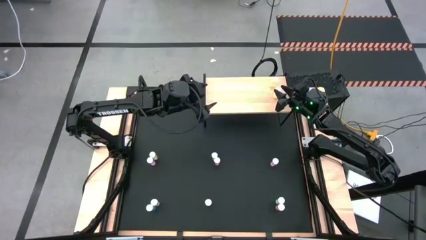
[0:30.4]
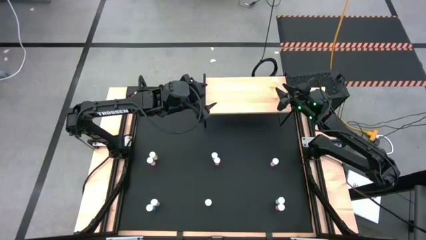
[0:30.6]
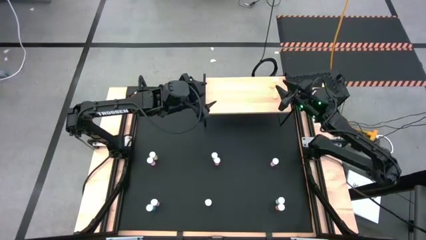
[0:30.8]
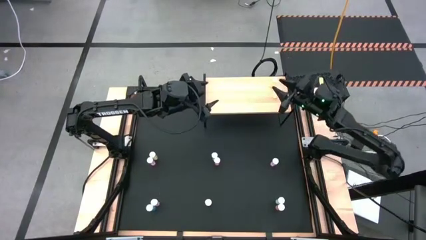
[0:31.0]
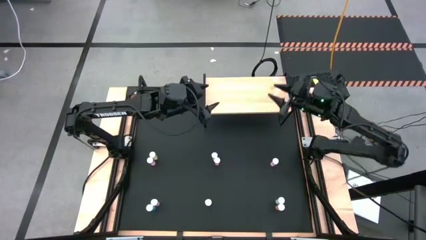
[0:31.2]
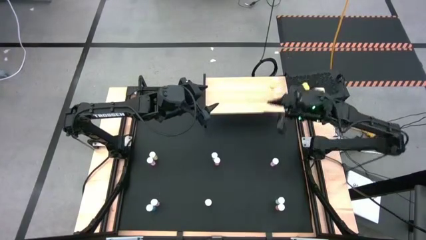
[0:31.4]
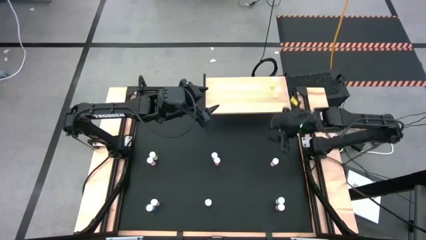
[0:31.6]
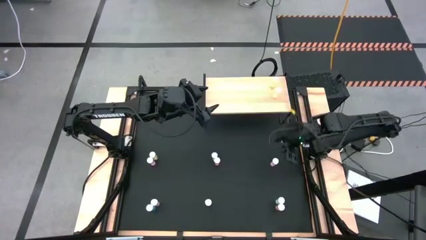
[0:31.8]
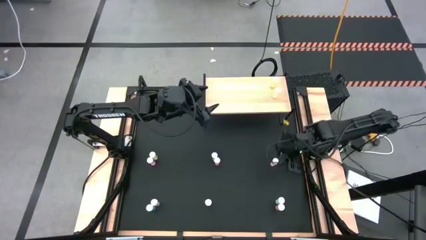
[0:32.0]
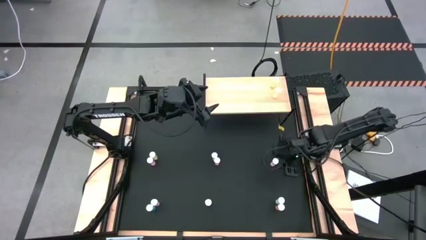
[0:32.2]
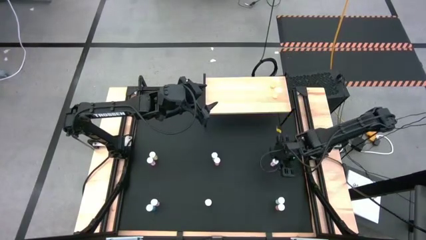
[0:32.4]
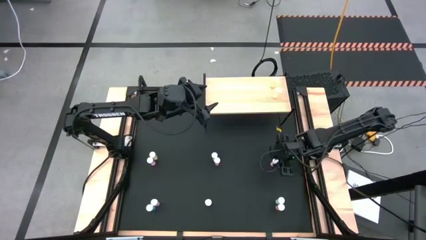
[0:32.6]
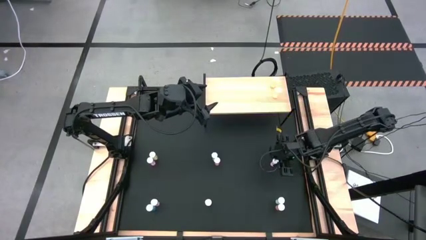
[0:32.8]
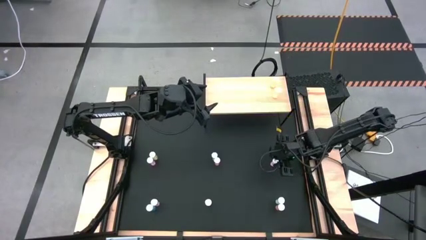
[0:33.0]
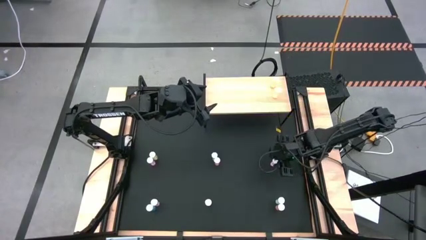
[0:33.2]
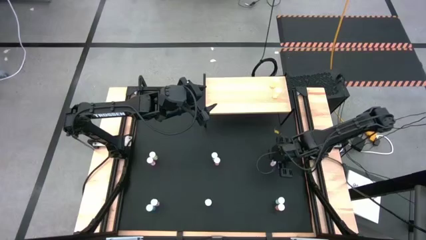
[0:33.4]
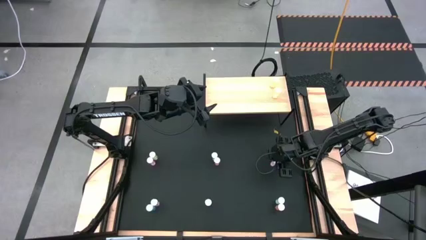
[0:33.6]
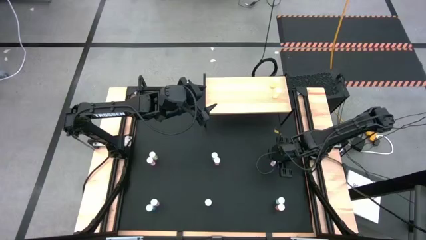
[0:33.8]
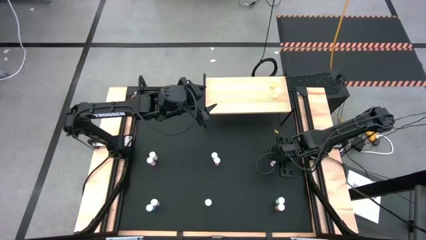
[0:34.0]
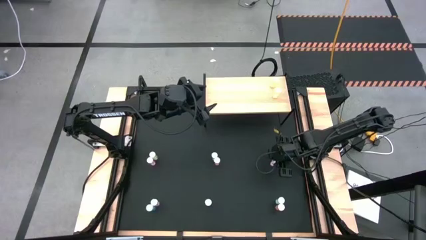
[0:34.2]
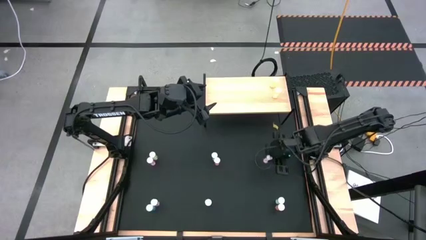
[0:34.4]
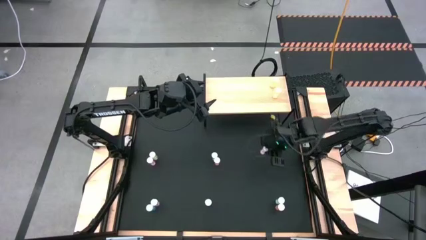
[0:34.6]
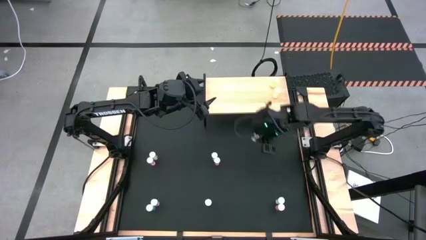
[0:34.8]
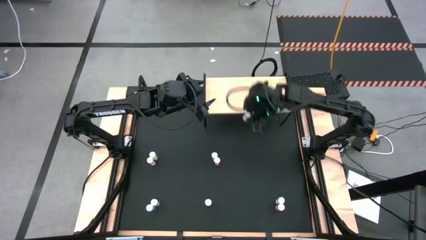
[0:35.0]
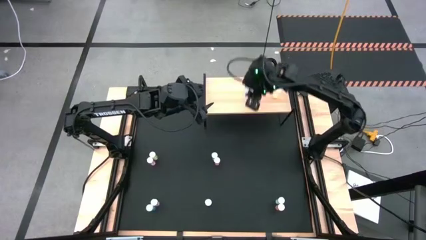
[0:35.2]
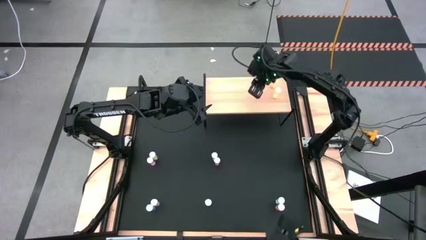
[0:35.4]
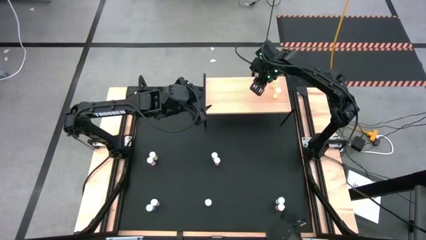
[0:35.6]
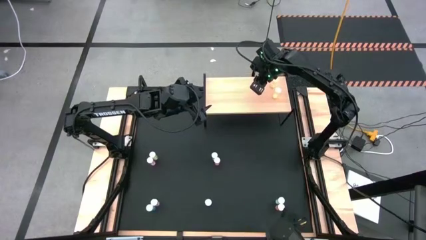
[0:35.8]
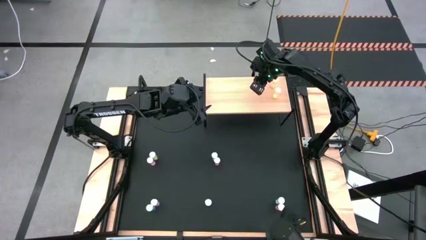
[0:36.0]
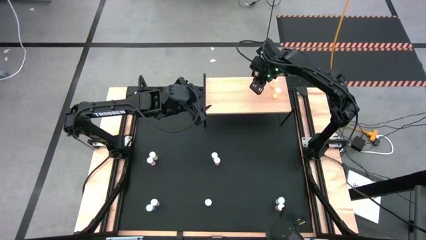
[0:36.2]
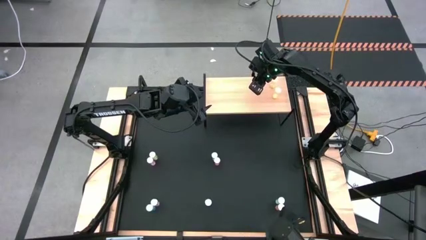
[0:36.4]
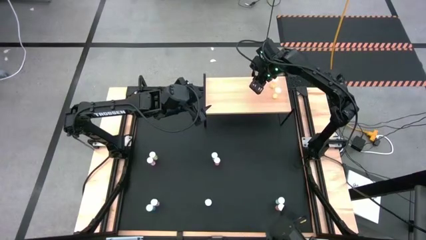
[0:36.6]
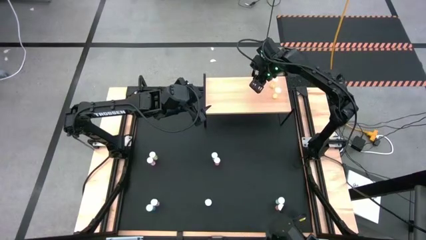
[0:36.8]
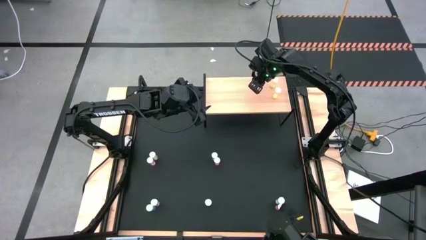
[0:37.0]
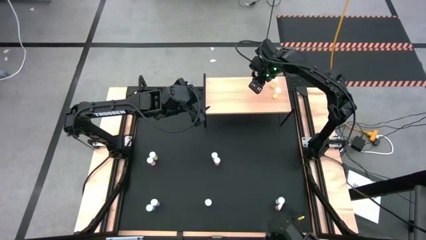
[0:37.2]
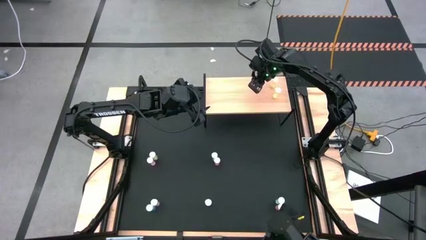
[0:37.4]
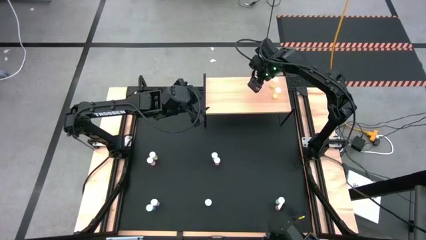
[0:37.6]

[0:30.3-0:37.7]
Task: Pick and place medicine bottles onto shelf by color
Put the top right pink medicine bottle on the shelf

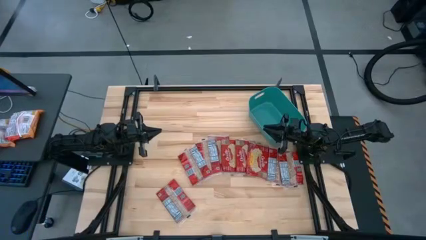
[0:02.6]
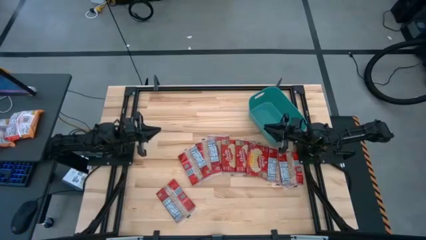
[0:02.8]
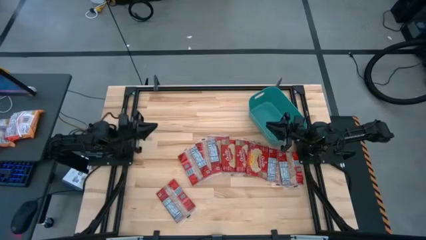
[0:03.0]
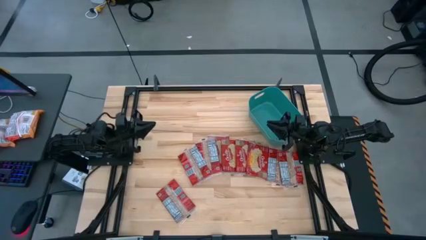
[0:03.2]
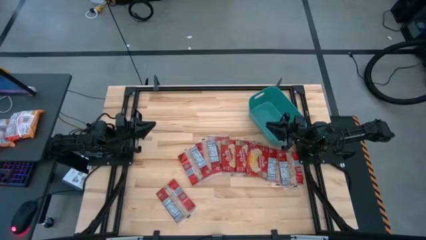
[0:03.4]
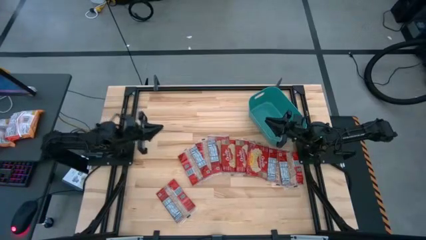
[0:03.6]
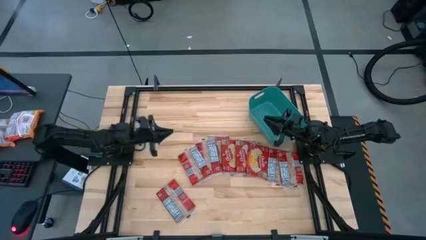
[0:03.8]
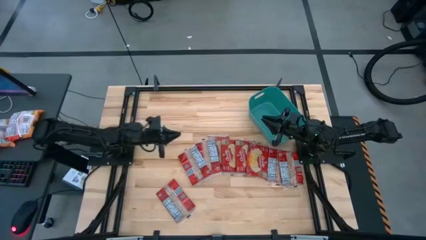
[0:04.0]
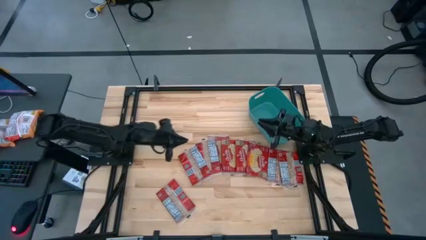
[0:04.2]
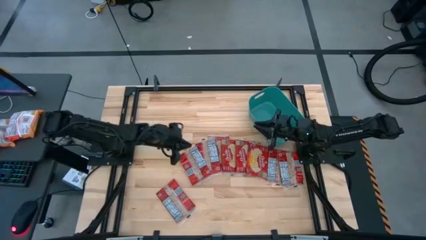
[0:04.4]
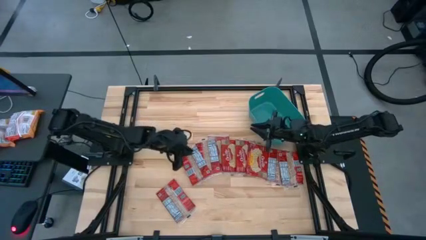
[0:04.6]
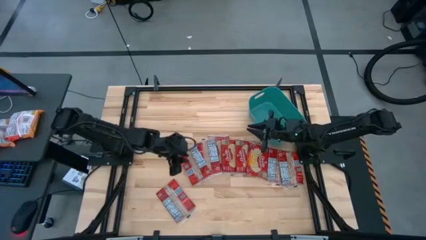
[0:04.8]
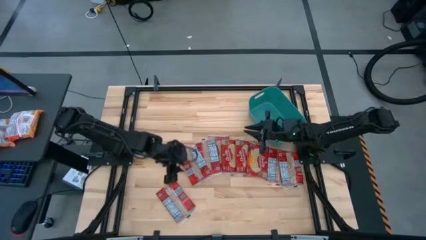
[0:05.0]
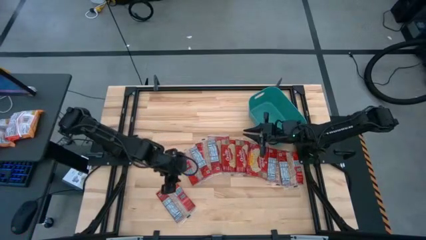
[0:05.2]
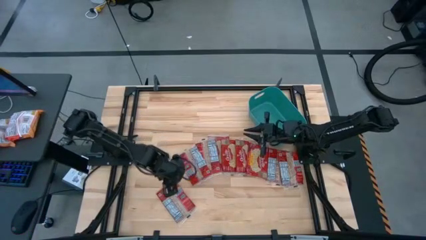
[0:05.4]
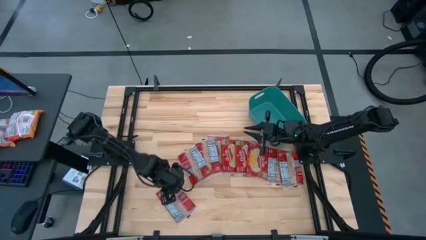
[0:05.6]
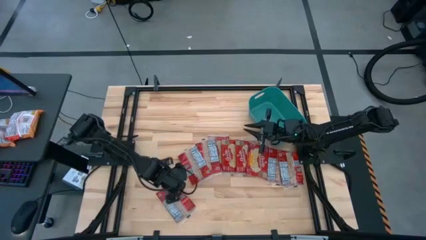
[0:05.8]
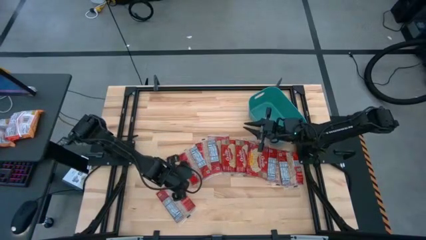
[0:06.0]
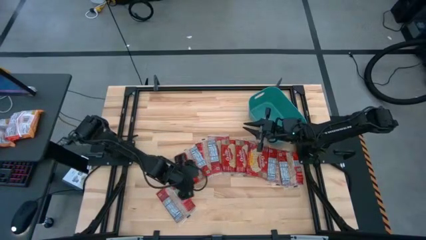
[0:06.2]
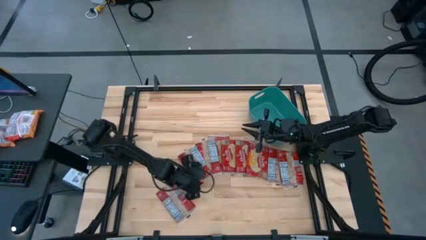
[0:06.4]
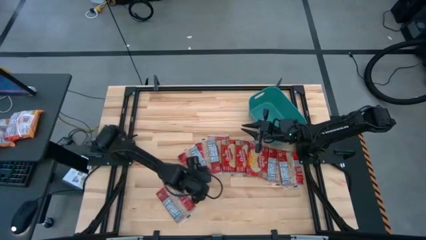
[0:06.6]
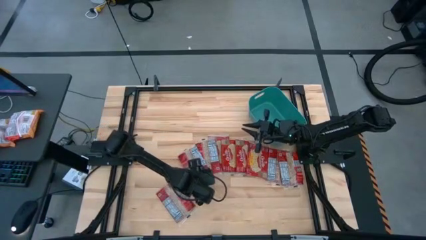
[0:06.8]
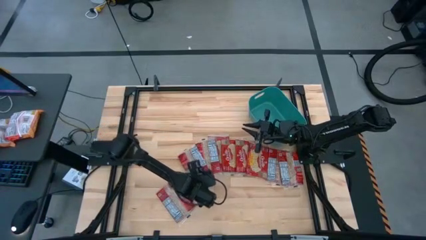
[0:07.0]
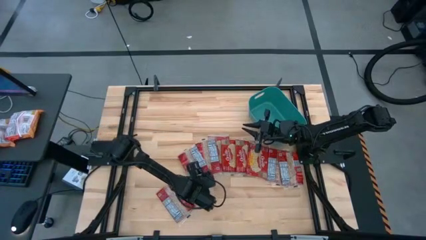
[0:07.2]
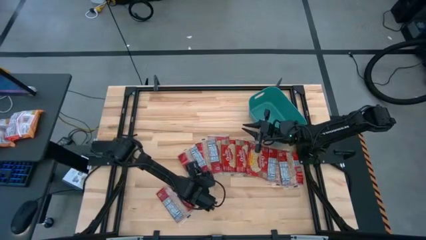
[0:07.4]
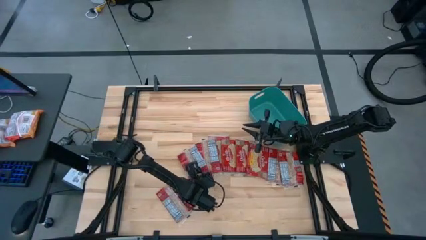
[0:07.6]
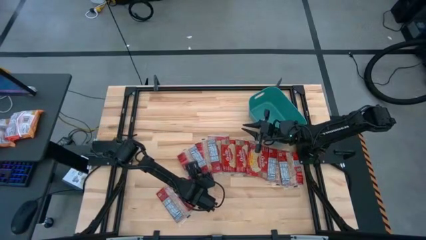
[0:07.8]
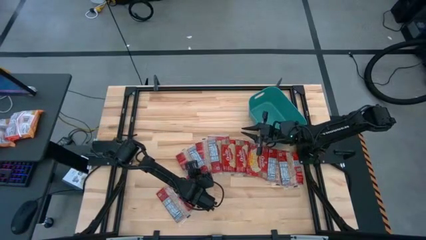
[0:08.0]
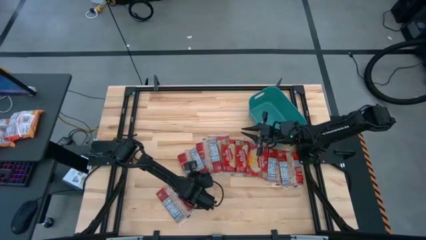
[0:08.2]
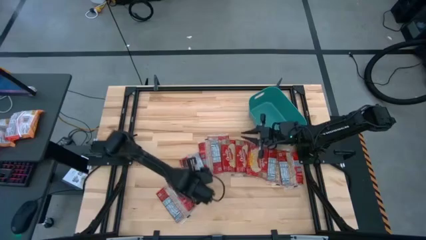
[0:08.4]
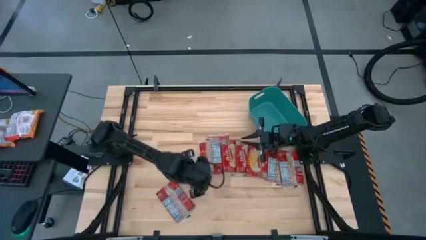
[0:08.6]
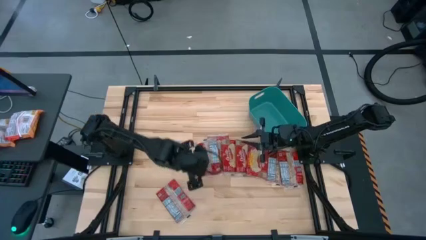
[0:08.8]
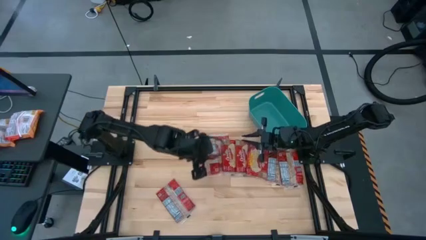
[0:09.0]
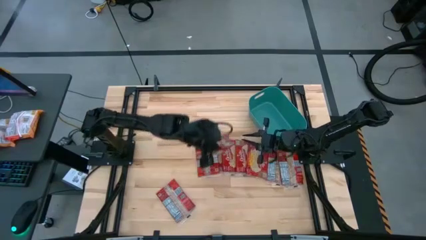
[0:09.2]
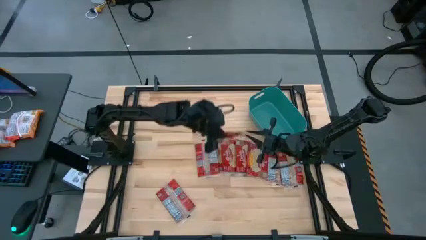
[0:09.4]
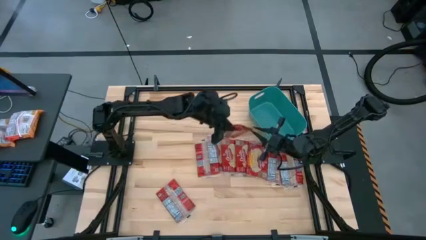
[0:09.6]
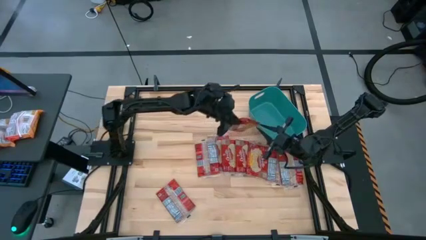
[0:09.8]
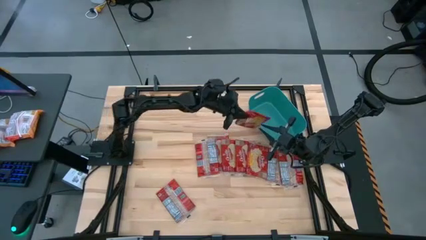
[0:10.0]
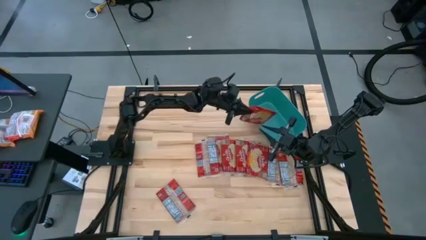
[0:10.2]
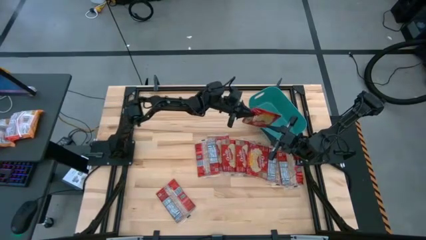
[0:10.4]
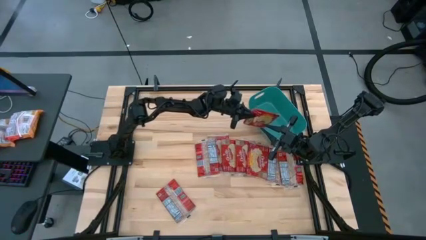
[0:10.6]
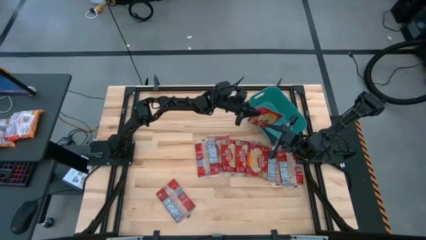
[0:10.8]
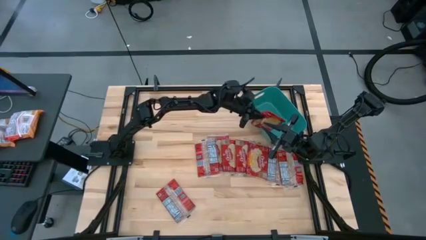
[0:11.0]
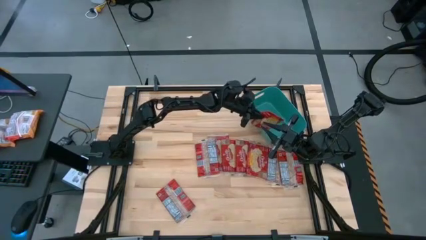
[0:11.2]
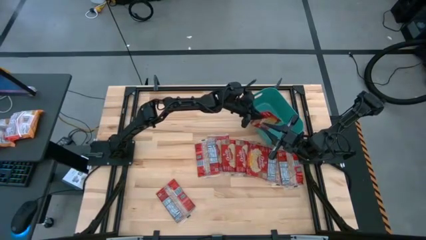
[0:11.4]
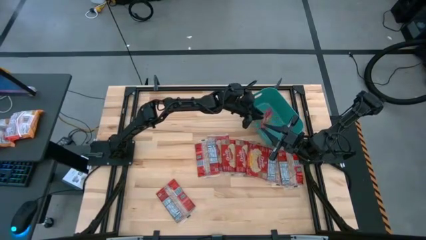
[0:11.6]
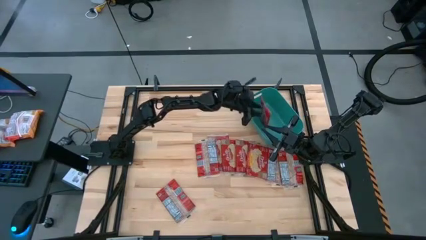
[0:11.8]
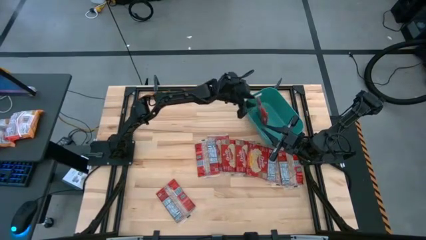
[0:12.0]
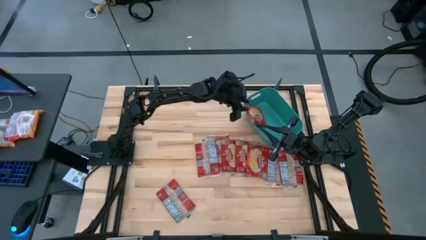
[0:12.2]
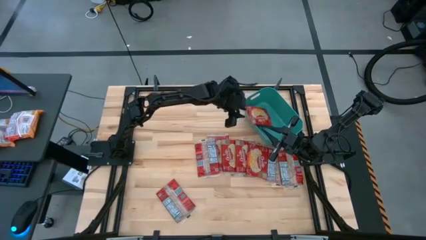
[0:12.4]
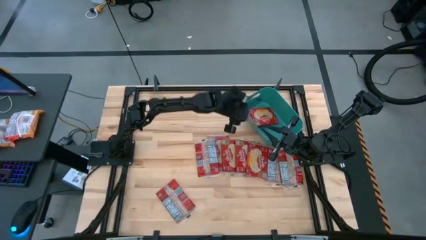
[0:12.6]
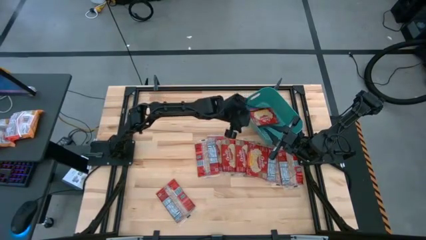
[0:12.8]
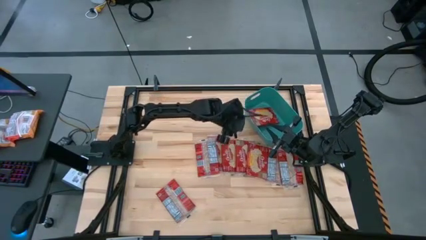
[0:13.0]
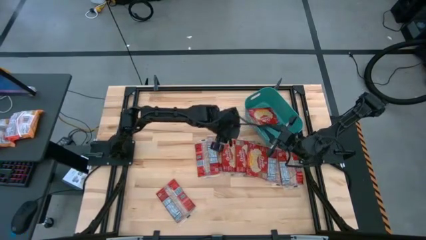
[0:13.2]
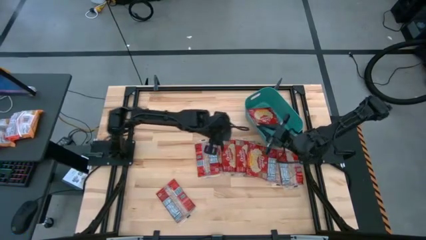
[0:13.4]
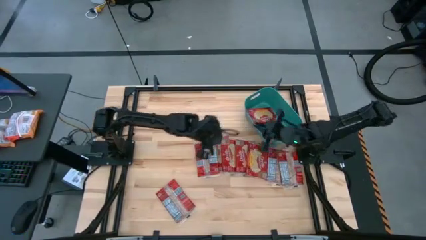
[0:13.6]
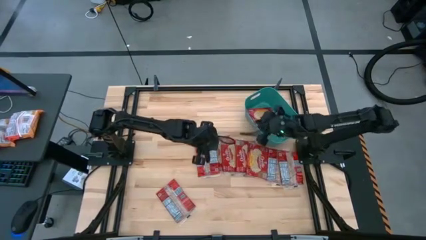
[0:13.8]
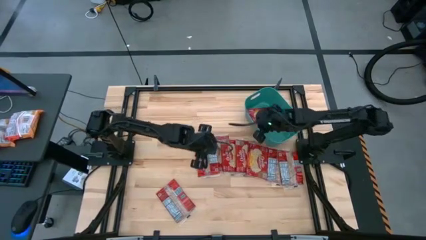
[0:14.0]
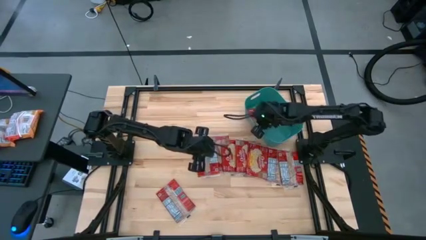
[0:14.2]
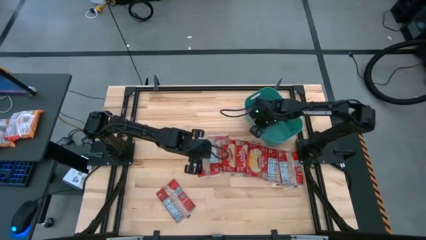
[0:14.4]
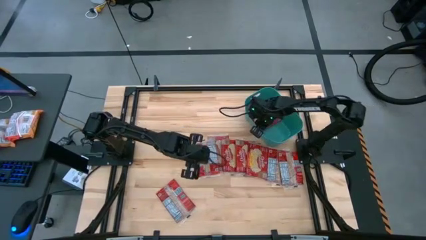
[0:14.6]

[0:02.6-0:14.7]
Task: Sort popcorn bags into baskets
Put the red popcorn bag into the green bin
